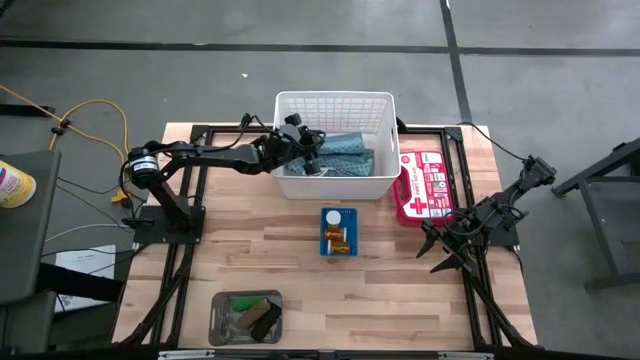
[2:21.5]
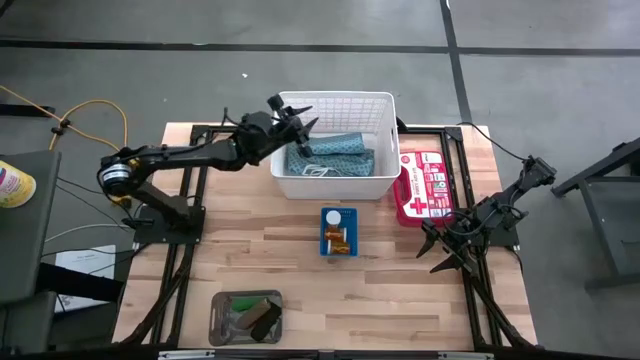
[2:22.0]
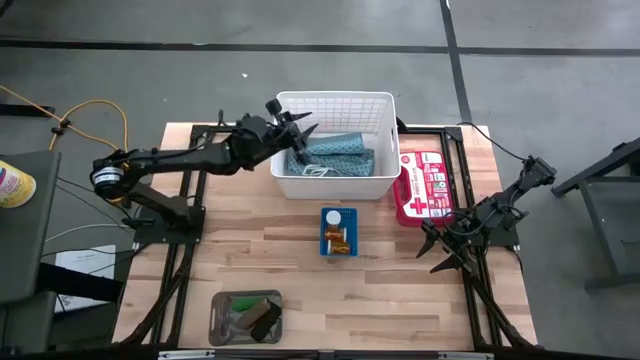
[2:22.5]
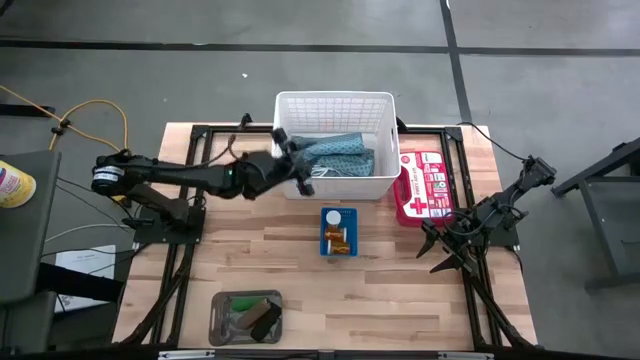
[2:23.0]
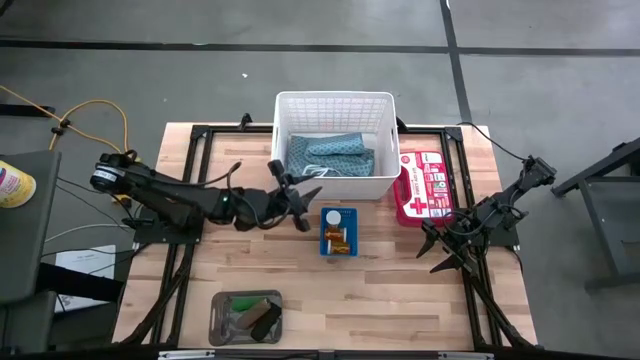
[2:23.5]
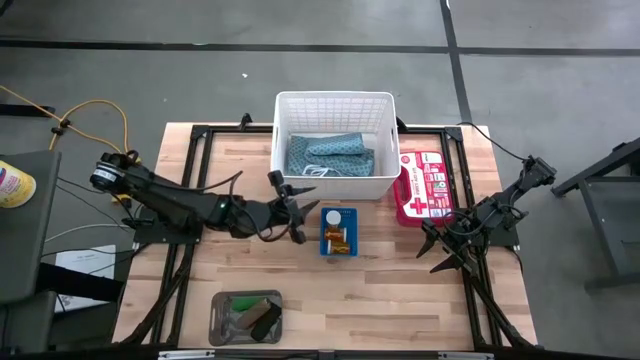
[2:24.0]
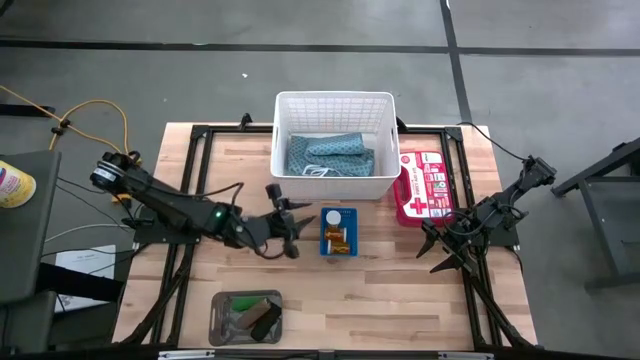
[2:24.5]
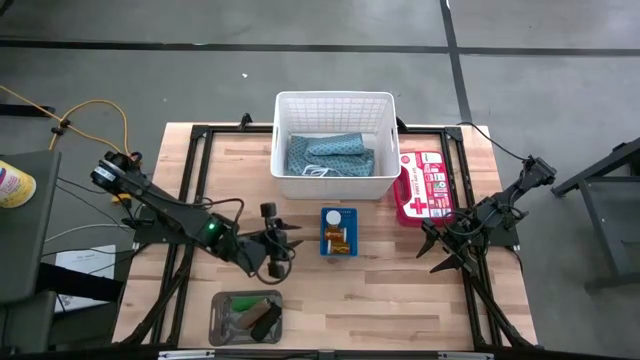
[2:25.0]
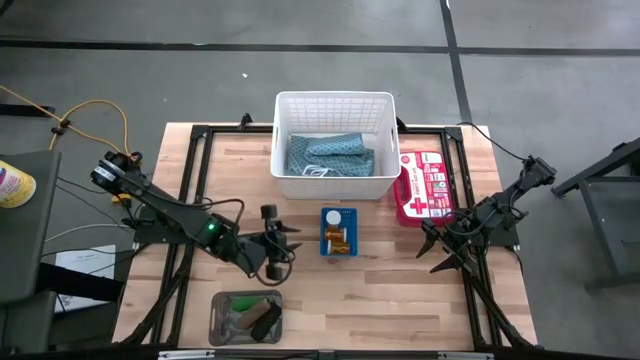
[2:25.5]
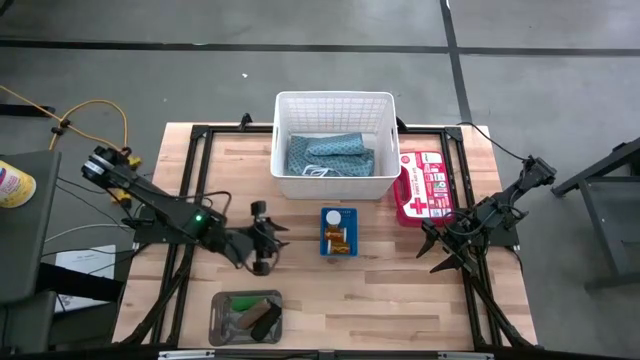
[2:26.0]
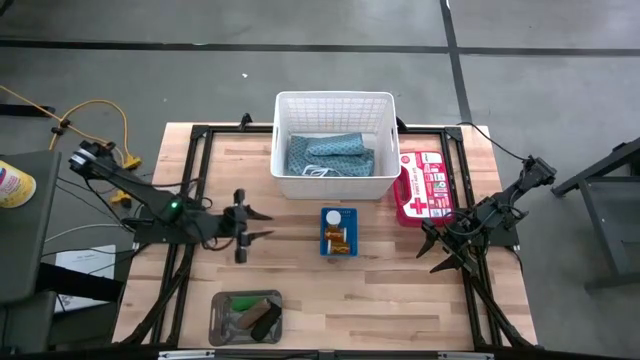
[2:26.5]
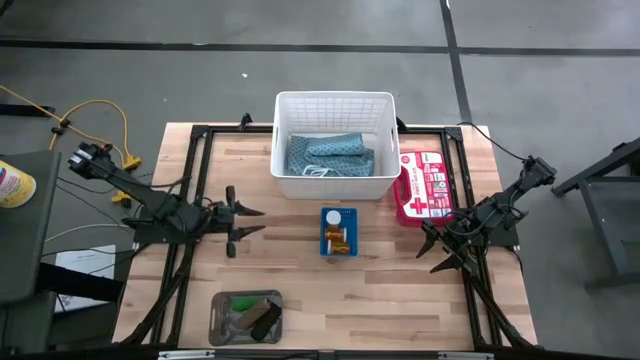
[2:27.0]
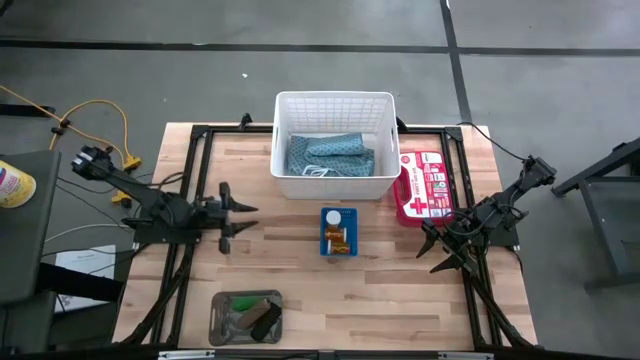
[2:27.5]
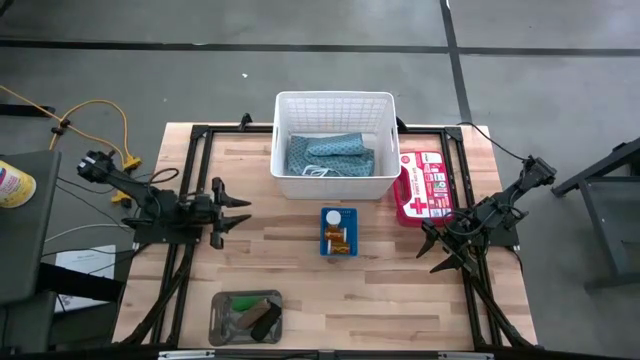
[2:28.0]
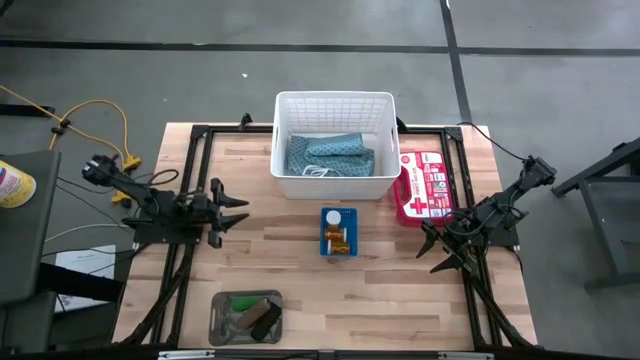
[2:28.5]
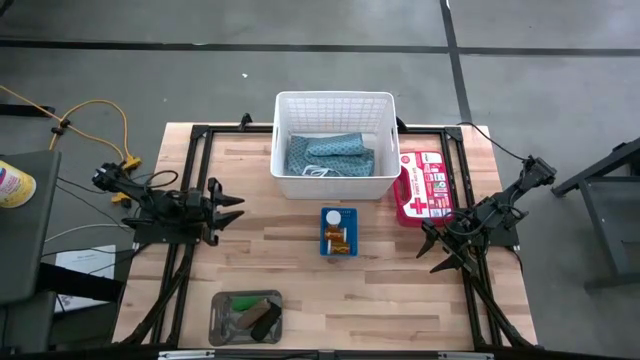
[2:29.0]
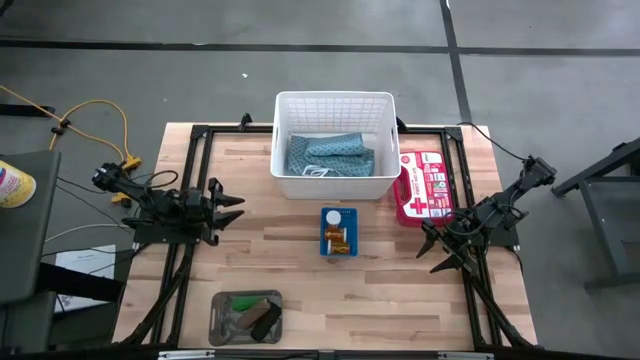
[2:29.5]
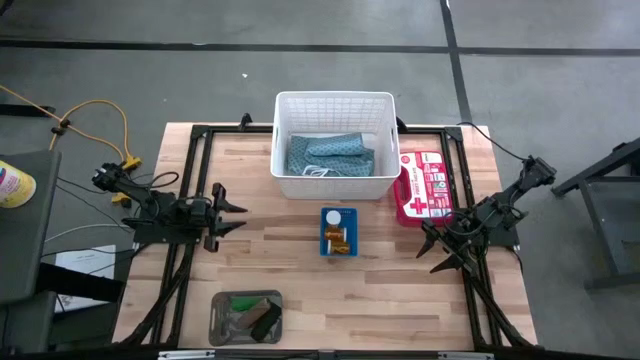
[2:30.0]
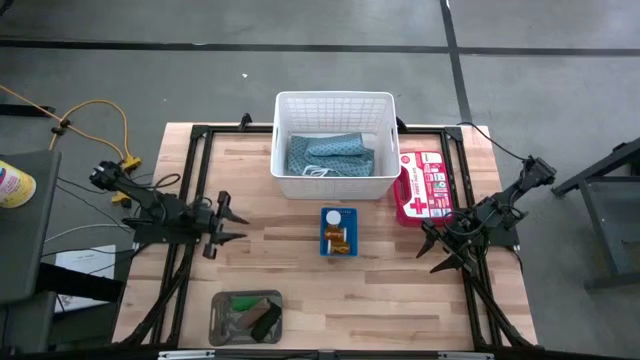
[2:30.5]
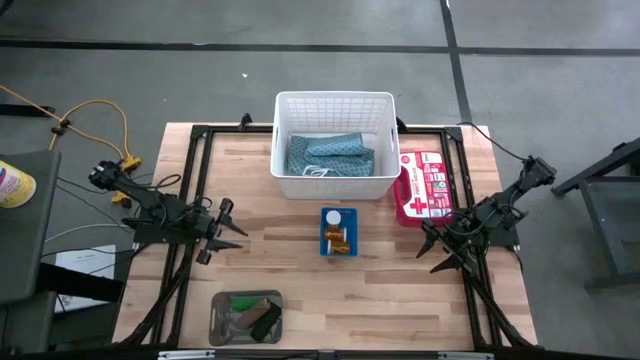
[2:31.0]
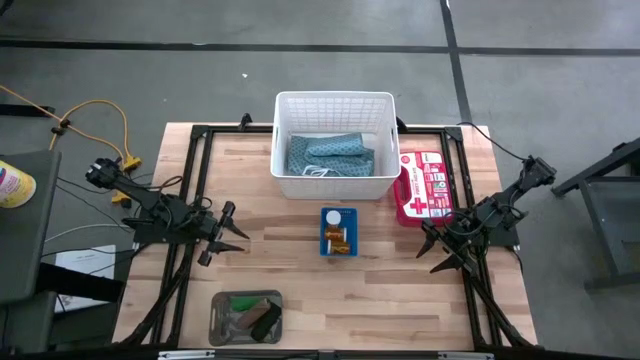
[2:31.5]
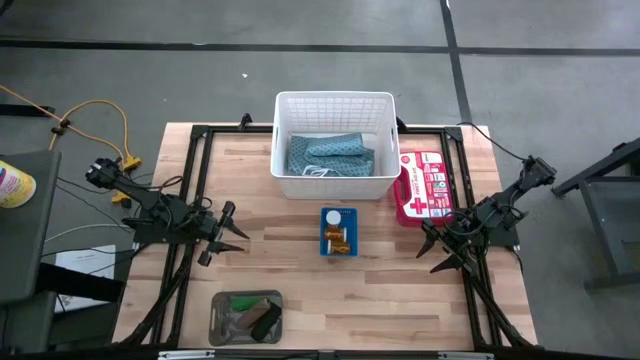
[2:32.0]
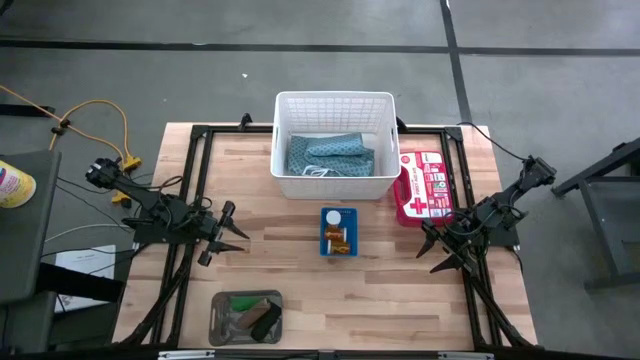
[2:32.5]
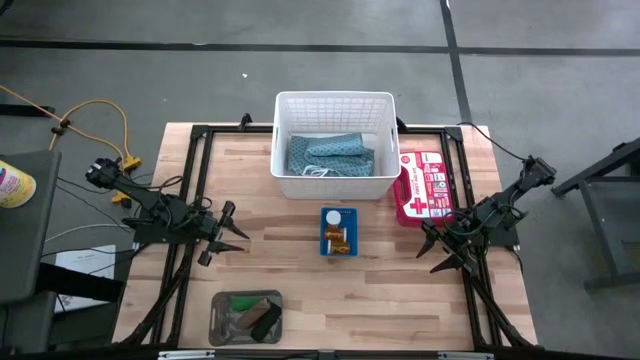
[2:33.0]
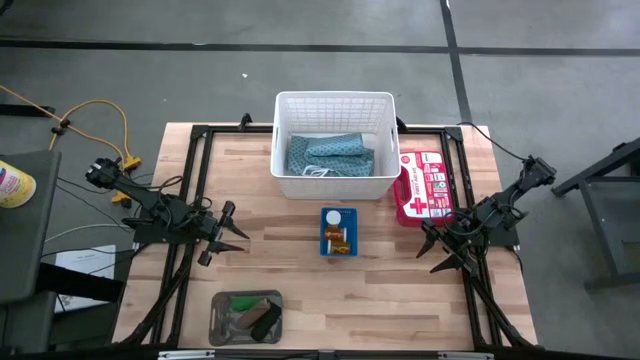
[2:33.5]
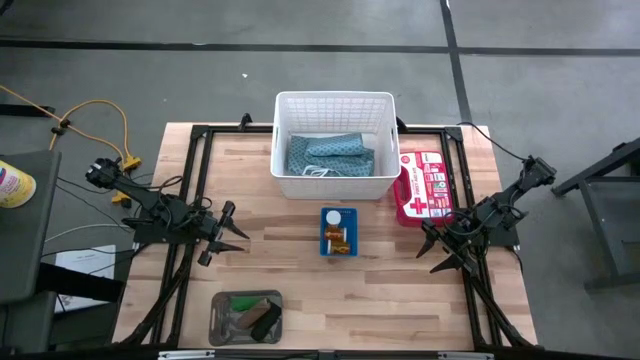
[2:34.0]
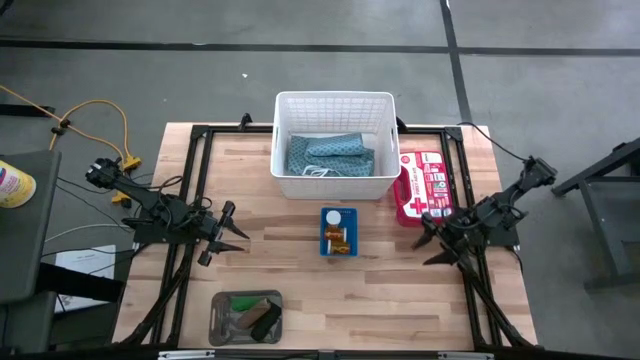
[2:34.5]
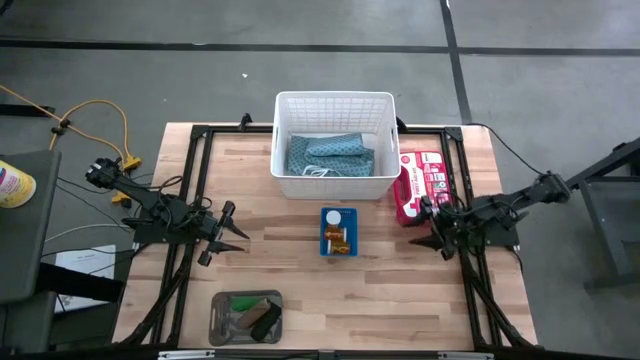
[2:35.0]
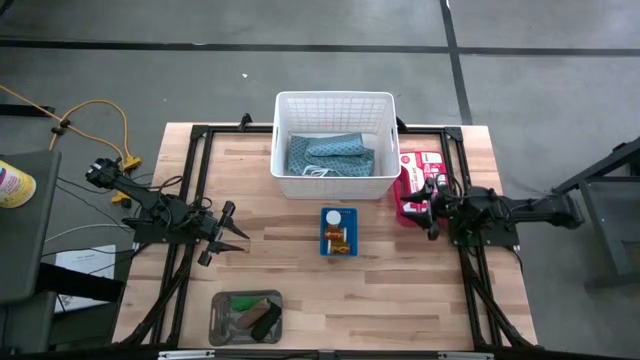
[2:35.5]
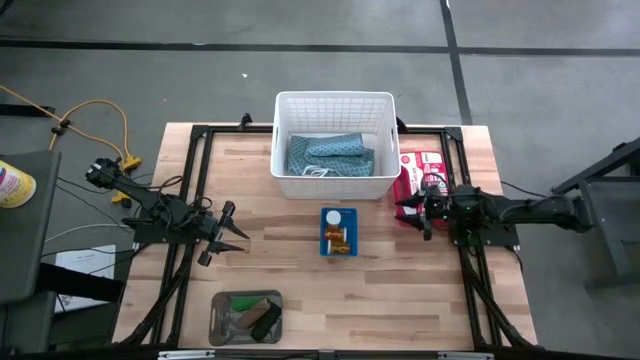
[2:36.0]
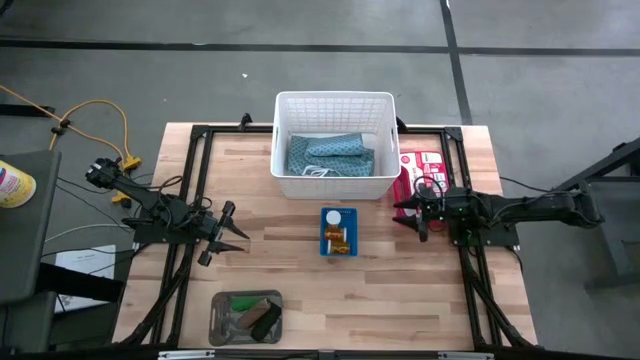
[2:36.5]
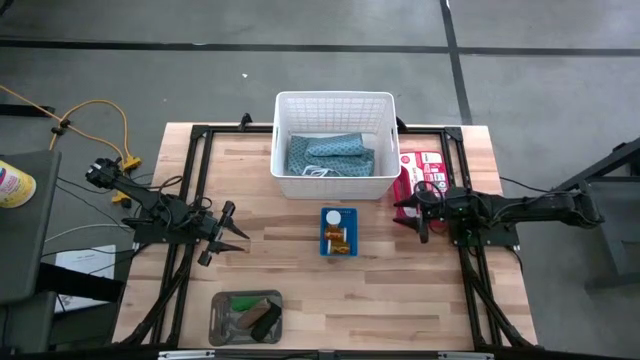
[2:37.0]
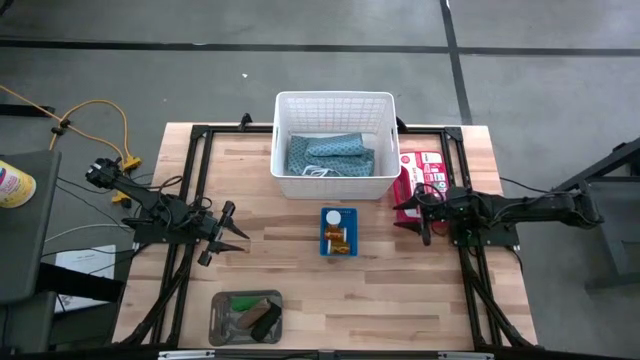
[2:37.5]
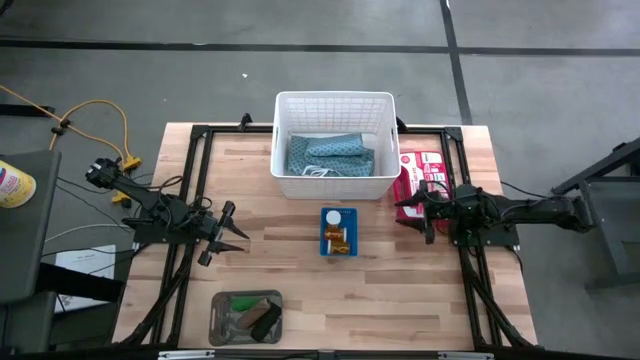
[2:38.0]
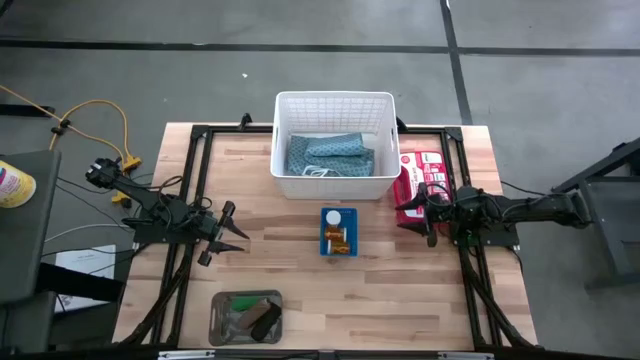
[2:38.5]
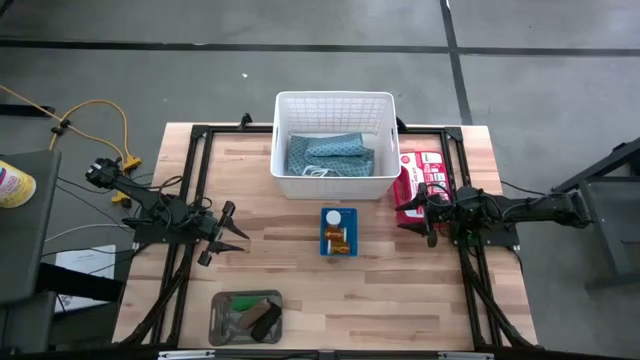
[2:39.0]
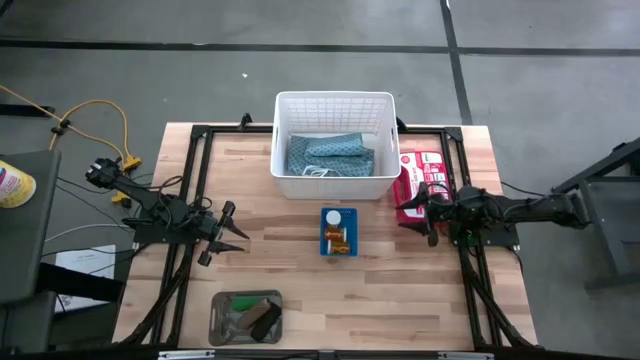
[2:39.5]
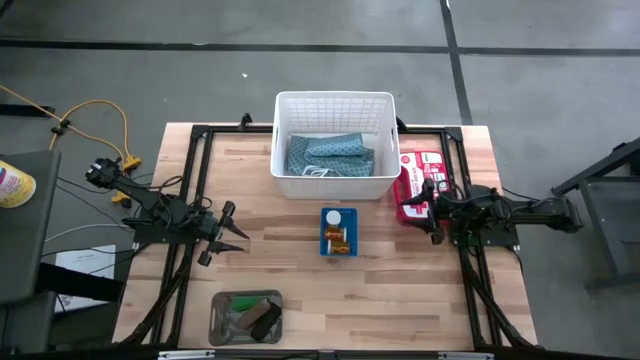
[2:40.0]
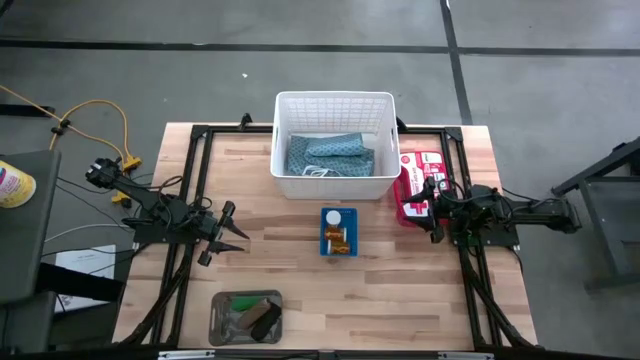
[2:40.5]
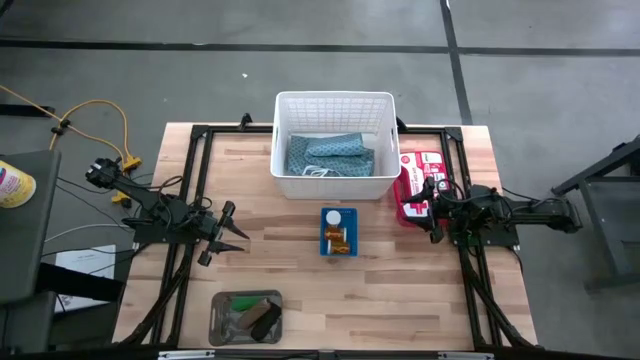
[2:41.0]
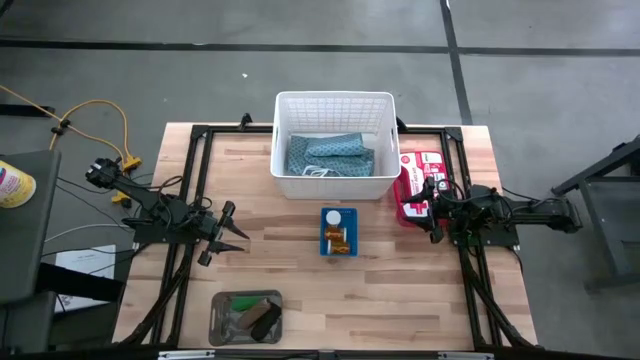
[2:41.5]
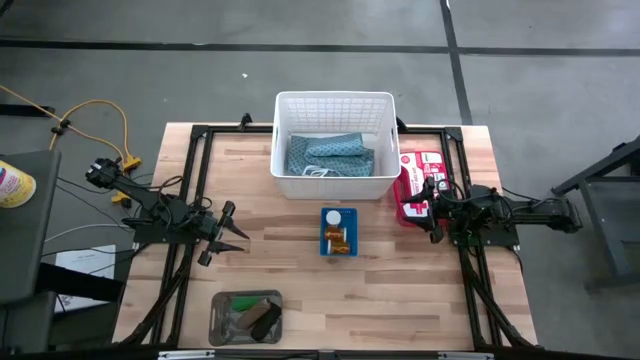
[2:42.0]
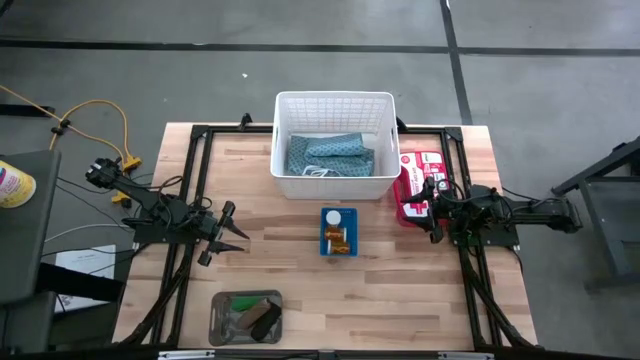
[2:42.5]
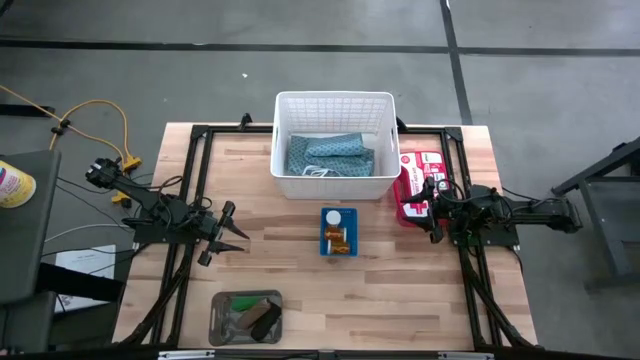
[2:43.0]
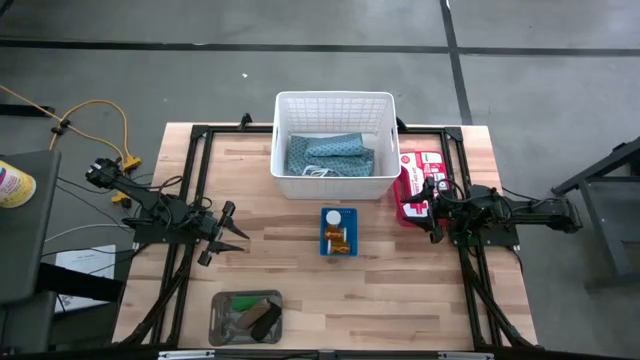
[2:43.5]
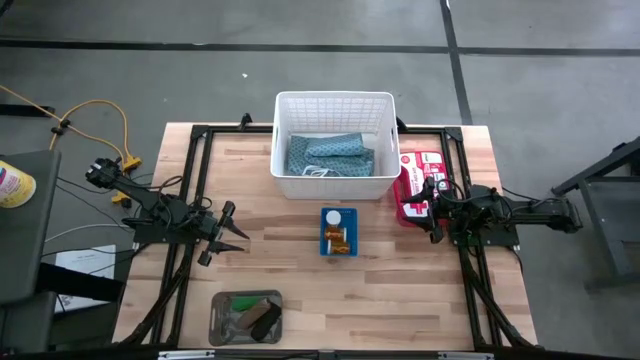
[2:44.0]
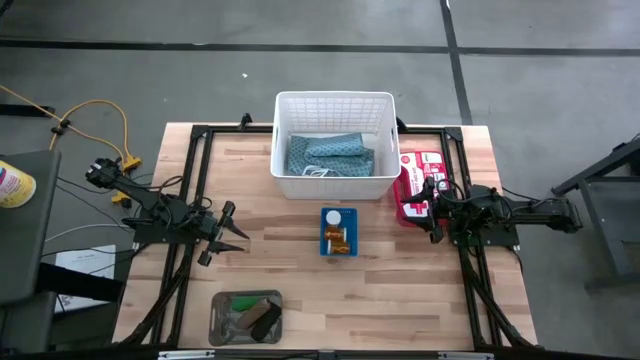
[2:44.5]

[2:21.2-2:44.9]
Task: Pick & place medical supplies in basket/bin
Return to Home Position
